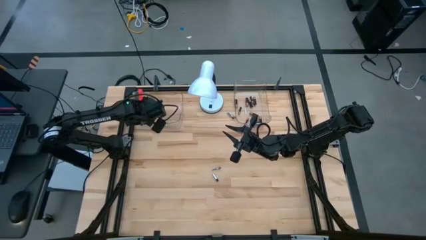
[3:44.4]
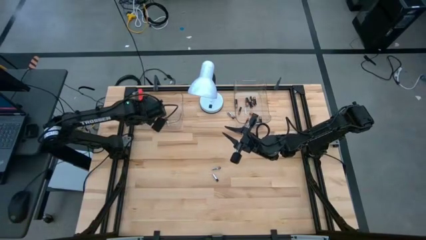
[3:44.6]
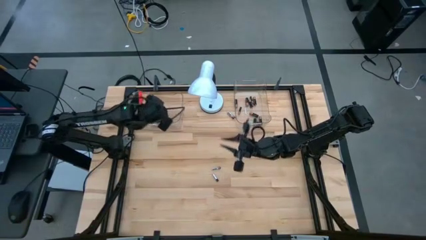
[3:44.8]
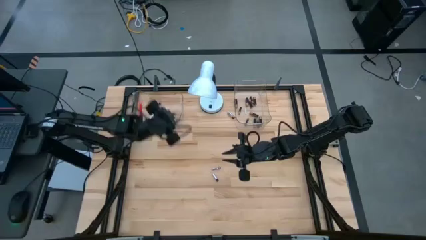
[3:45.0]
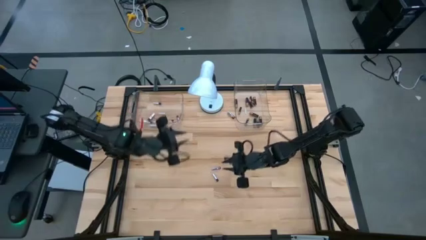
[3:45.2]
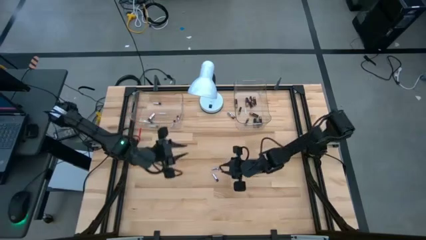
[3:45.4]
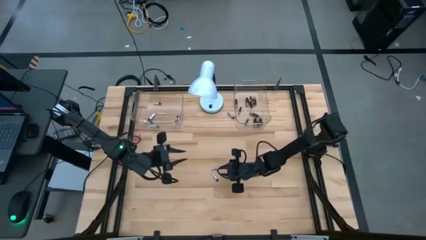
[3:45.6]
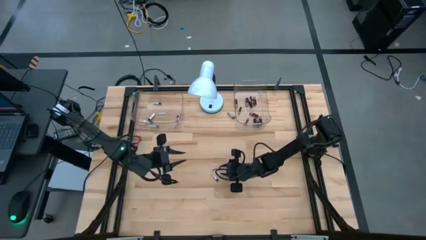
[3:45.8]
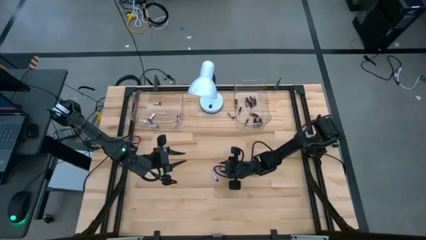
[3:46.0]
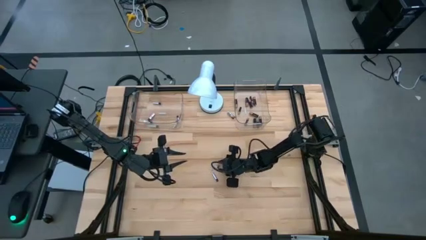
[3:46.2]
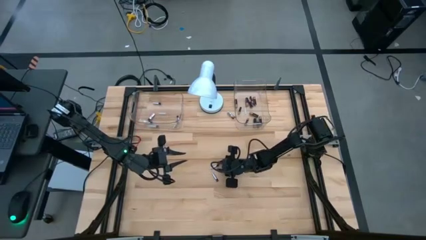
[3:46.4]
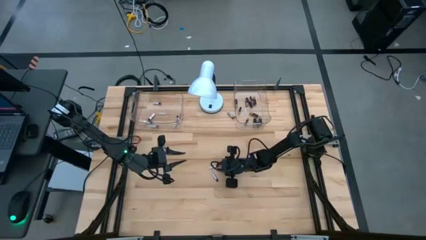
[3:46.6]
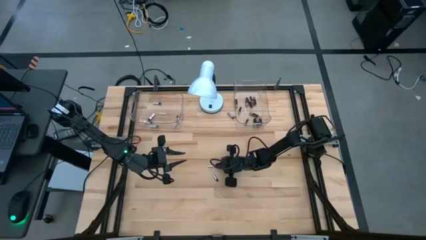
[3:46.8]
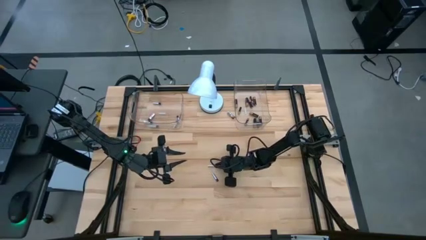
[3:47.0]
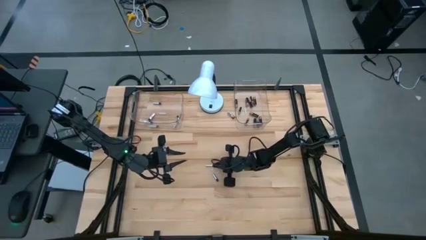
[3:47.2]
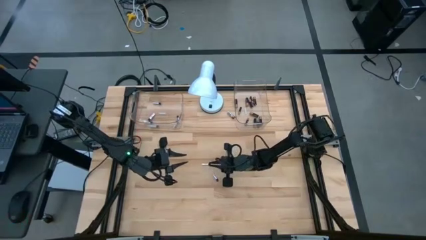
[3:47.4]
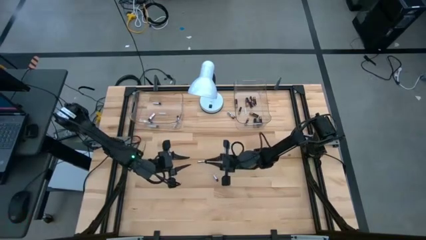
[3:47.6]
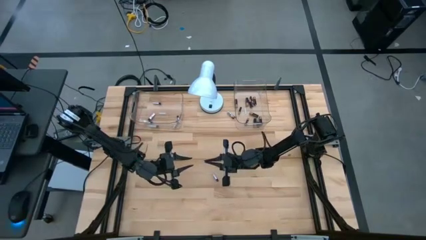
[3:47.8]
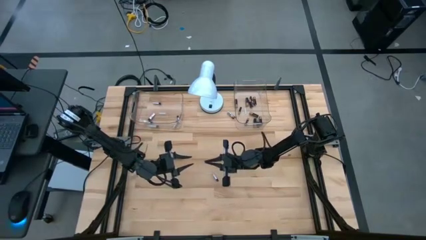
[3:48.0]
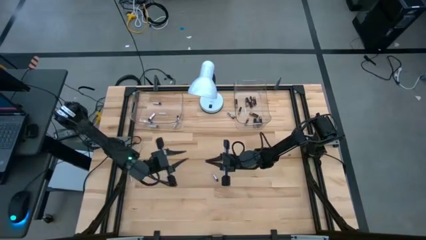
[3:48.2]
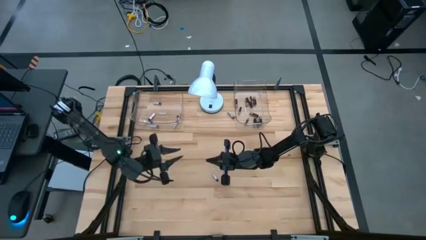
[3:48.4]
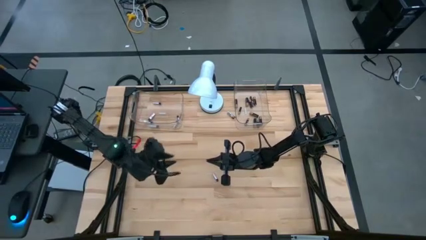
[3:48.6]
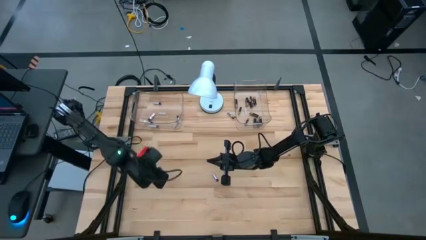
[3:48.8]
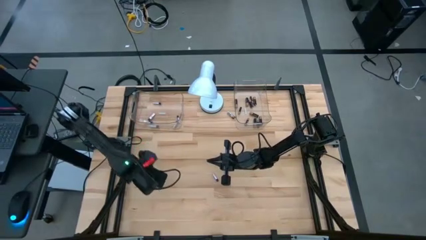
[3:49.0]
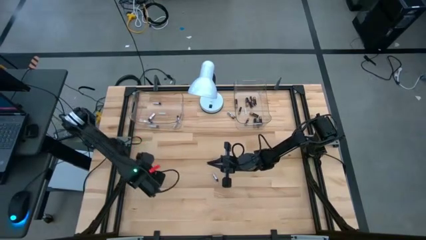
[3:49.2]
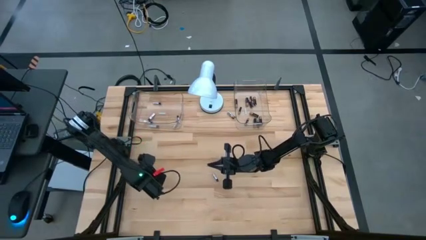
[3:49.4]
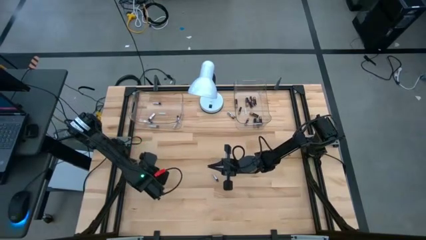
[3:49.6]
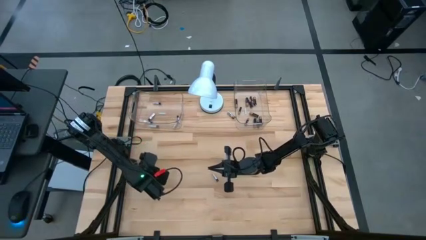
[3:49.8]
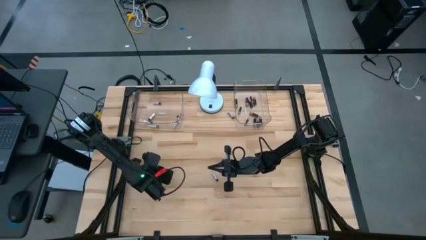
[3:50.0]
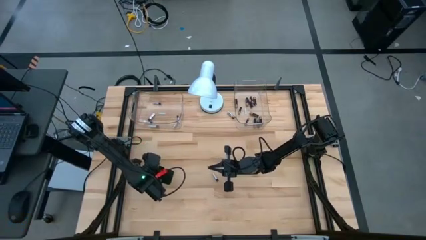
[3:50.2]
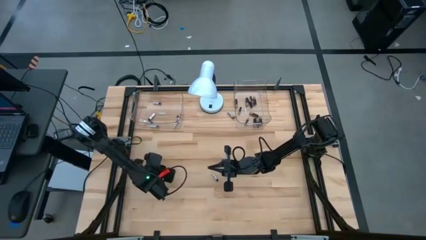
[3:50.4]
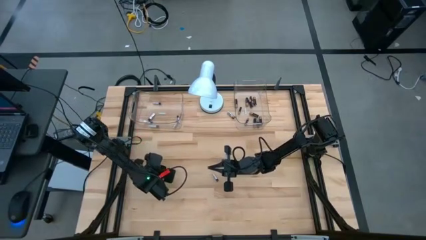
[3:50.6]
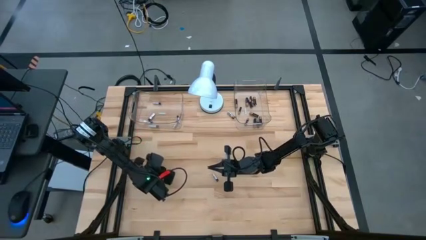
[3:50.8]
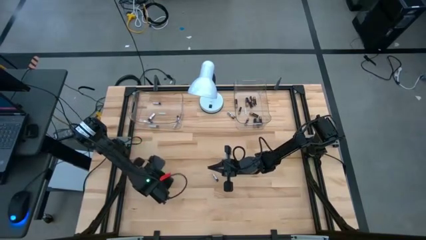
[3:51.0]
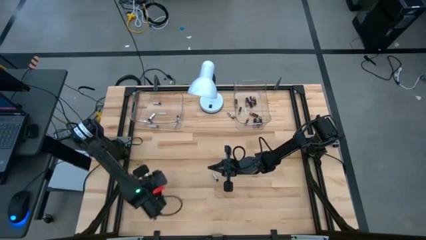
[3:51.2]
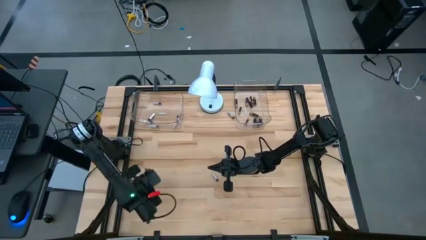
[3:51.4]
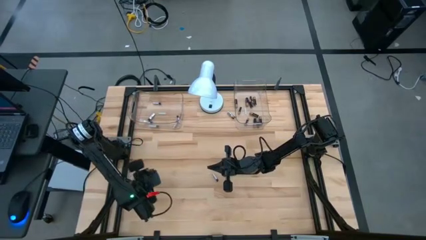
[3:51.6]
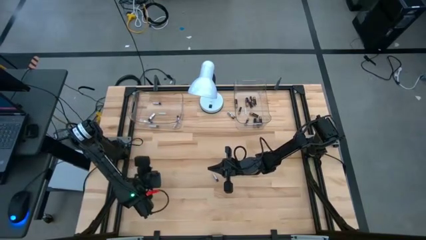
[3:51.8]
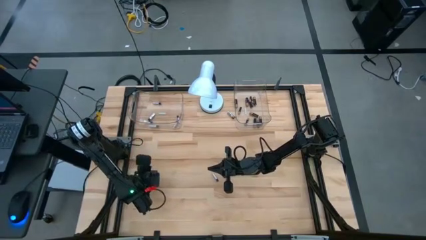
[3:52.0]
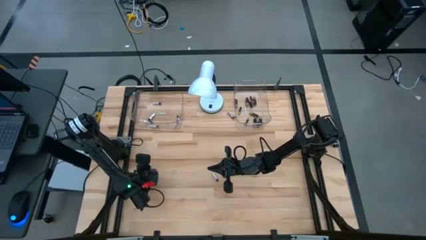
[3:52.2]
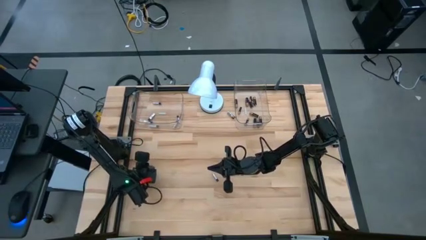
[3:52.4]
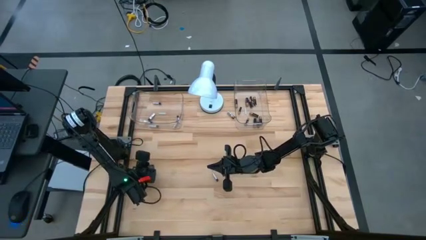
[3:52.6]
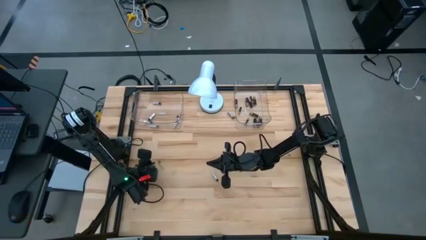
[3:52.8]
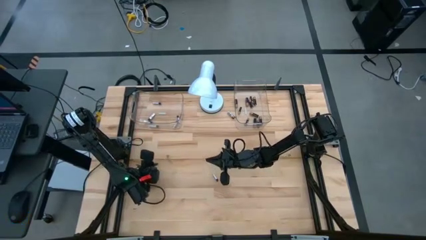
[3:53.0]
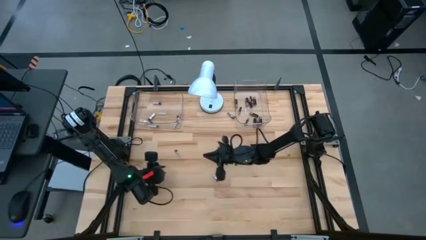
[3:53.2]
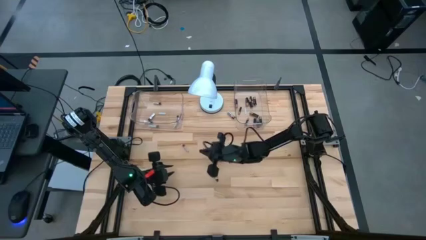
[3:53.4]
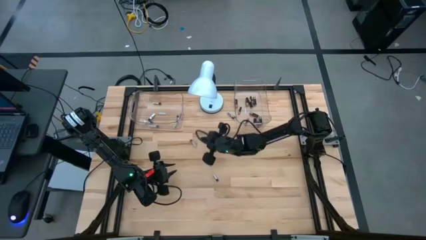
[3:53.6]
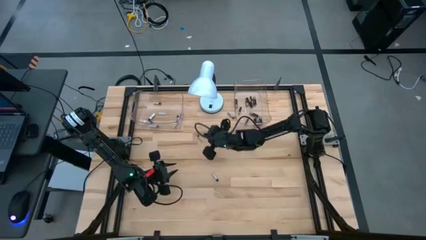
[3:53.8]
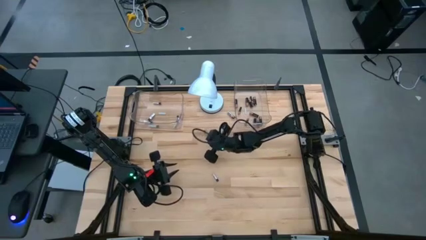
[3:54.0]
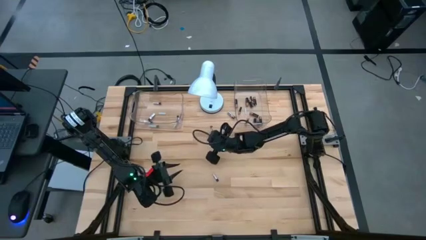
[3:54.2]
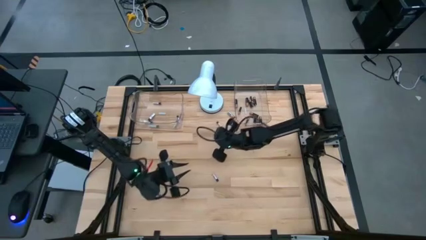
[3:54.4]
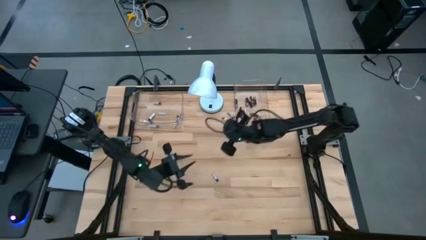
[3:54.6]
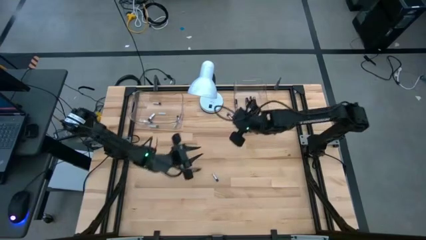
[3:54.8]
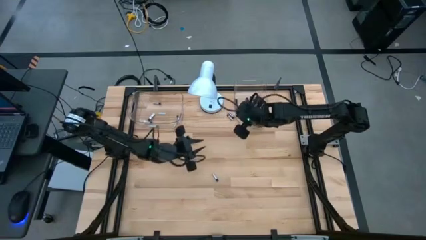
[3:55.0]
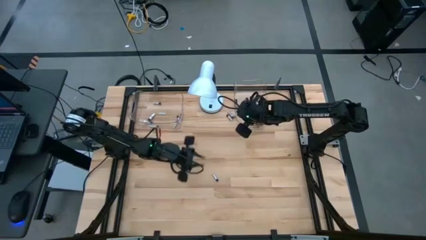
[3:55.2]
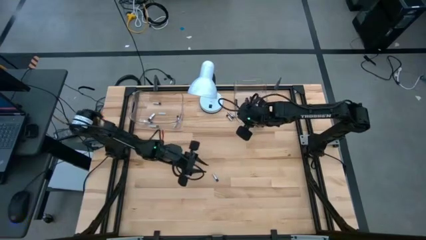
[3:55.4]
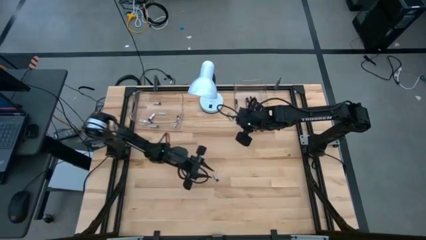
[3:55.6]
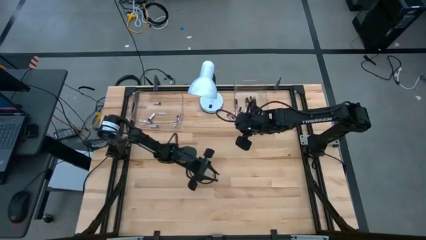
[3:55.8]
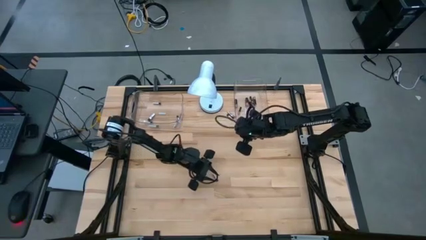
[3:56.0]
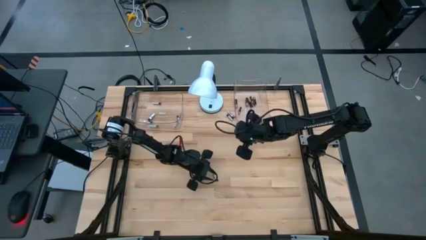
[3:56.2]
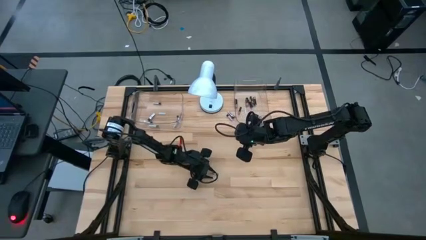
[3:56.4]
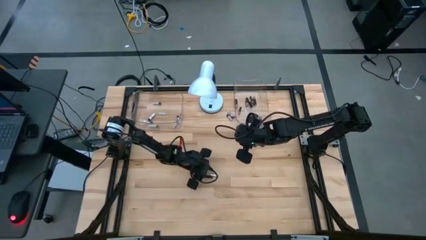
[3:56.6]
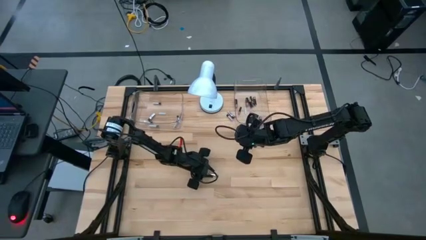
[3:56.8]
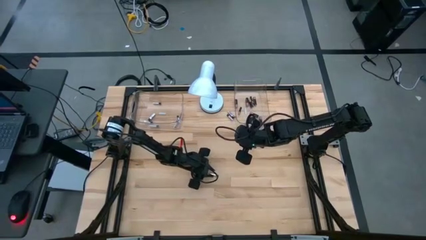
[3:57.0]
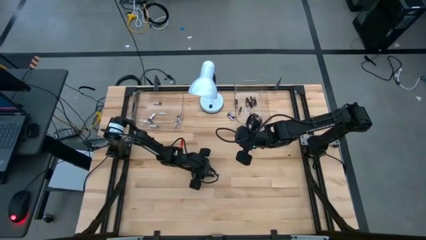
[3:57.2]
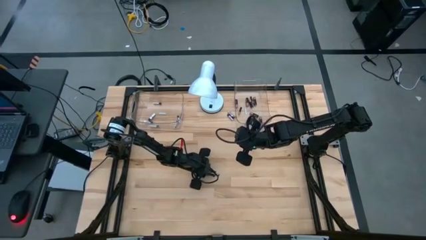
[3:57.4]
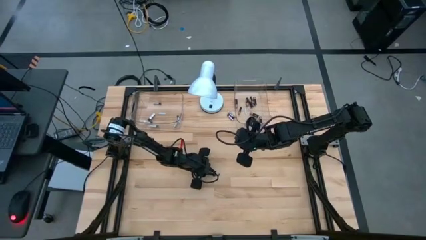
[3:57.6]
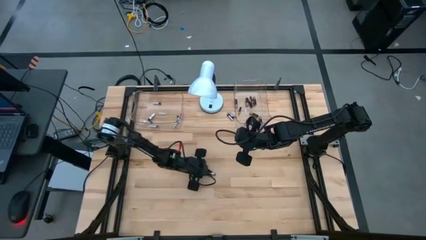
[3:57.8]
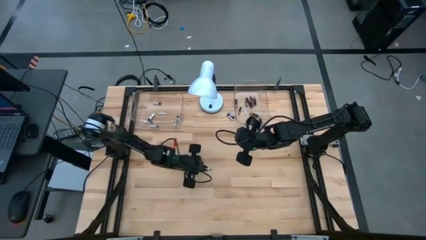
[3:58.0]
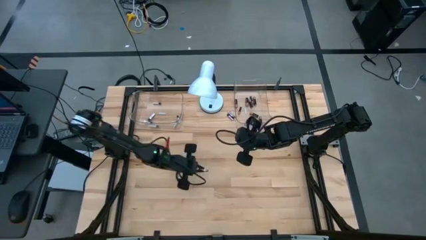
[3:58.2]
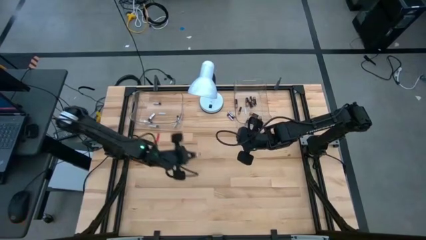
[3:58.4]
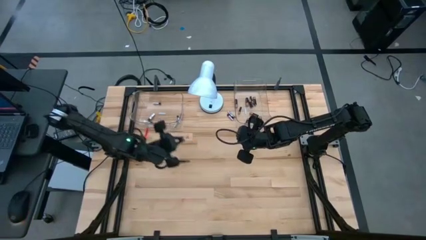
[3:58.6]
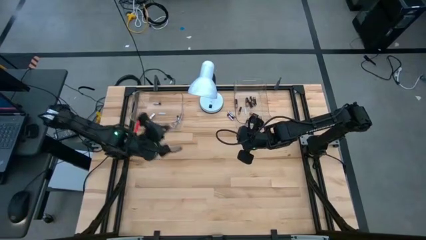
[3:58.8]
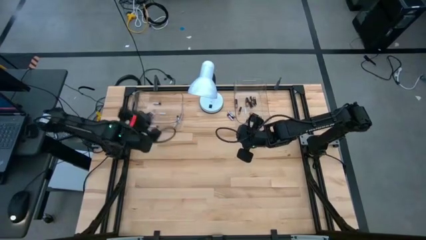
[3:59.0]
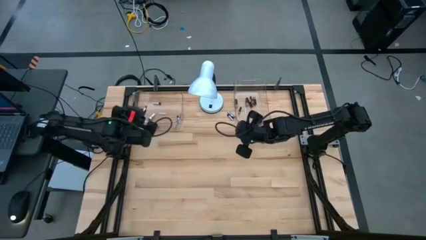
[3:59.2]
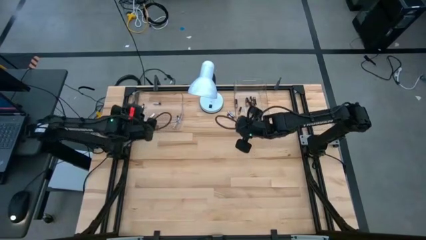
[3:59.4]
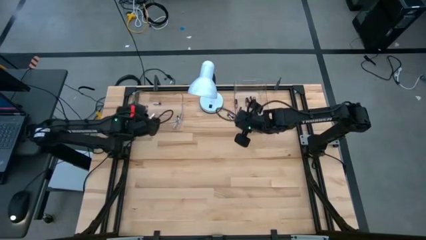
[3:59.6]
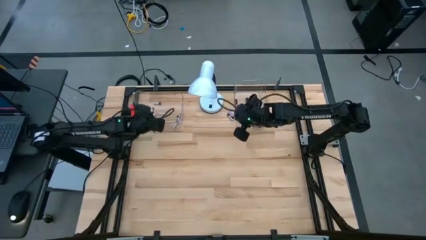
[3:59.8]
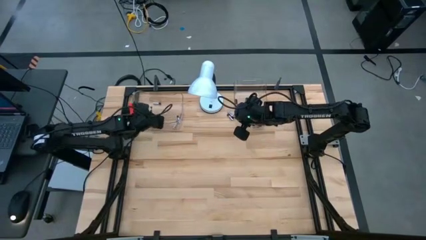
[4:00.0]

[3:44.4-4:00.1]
Task: Sort batteries
Put the silver battery in the transparent bin

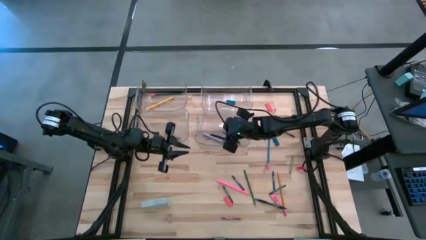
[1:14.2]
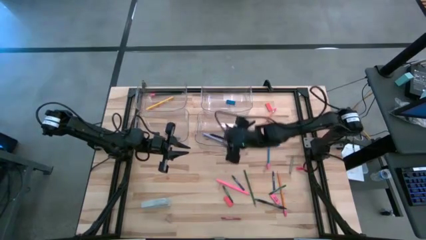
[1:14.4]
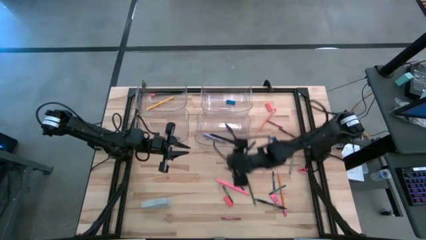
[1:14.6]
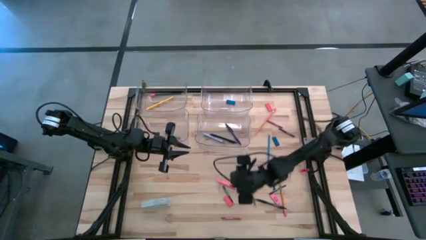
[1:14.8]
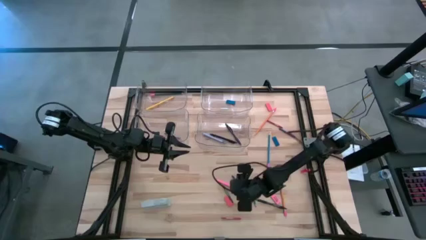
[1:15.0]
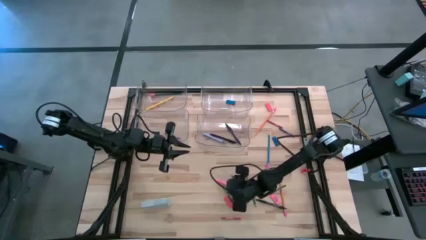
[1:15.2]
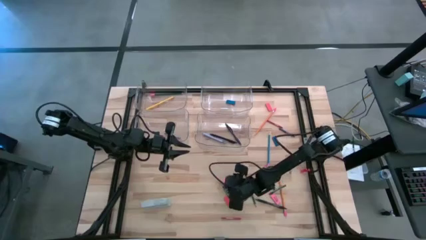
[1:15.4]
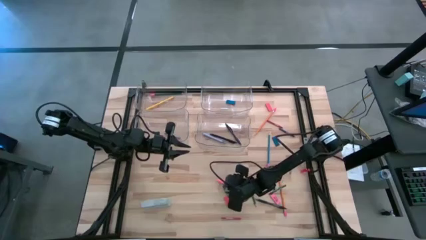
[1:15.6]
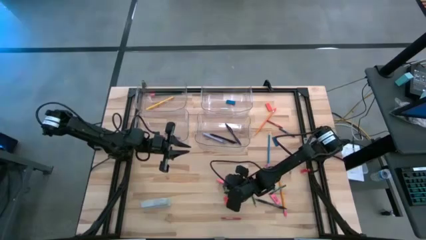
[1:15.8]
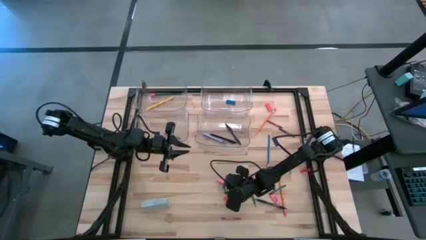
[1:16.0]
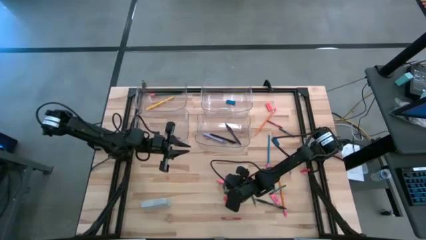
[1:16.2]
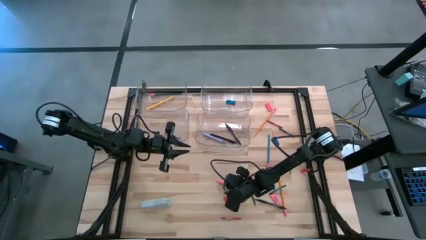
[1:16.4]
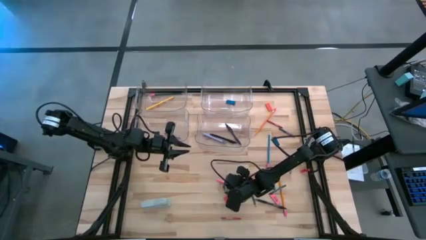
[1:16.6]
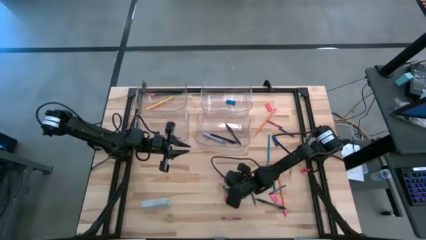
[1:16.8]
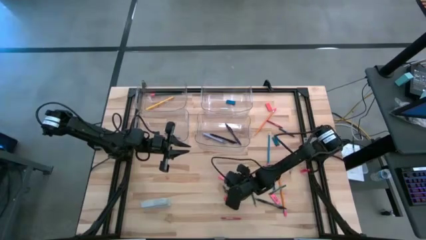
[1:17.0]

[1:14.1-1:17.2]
Task: Sort crayons/erasers/pens/pencils in bins
Adjust the pink pencil
